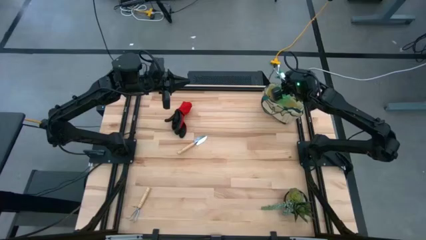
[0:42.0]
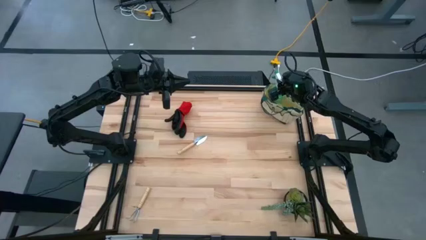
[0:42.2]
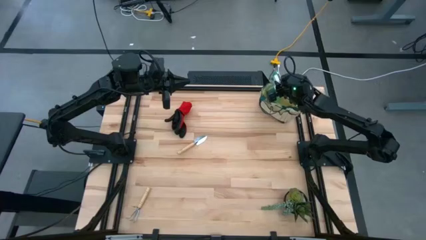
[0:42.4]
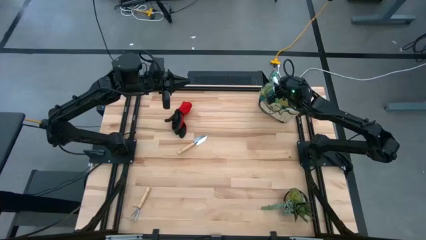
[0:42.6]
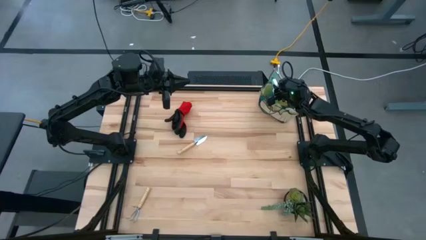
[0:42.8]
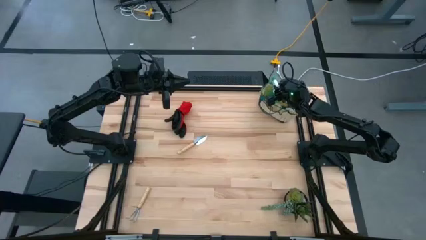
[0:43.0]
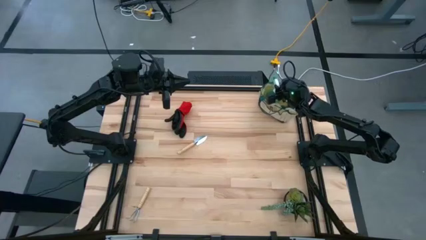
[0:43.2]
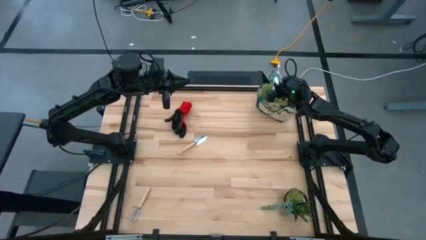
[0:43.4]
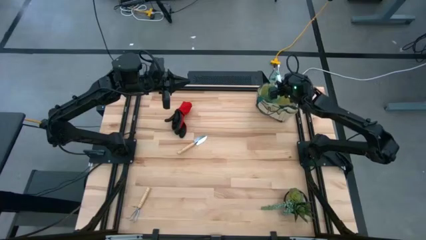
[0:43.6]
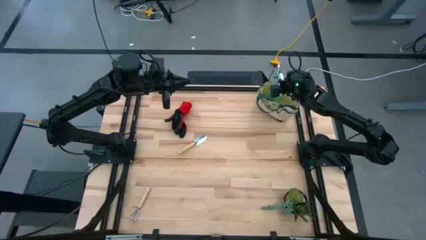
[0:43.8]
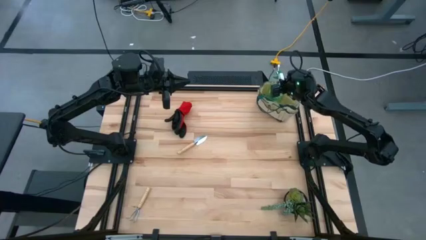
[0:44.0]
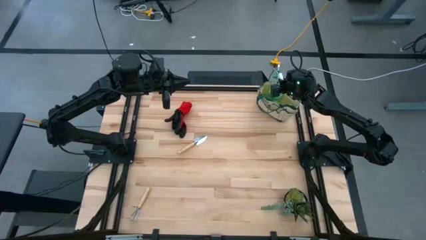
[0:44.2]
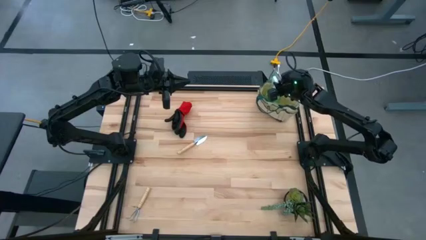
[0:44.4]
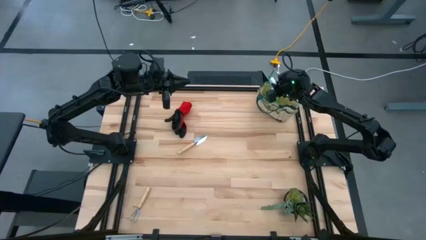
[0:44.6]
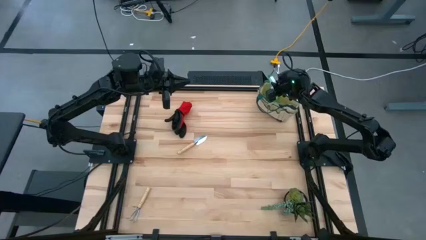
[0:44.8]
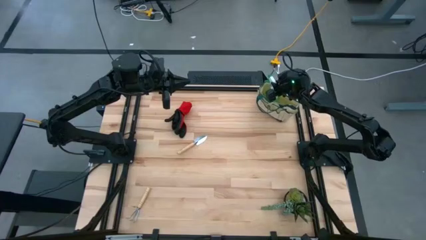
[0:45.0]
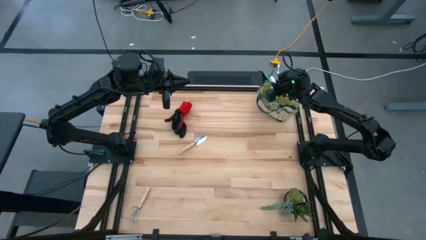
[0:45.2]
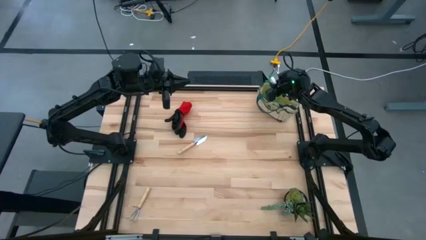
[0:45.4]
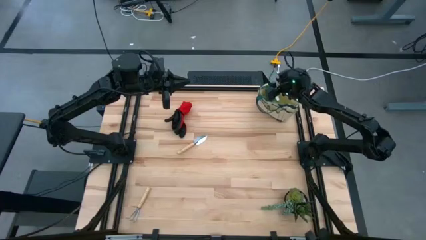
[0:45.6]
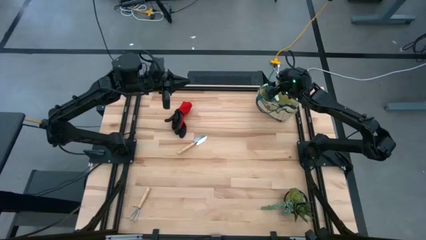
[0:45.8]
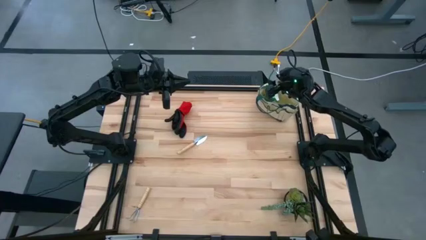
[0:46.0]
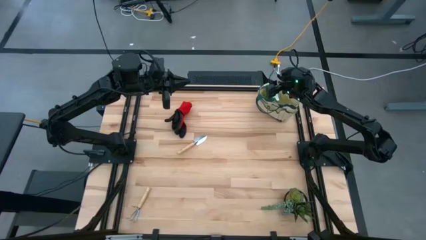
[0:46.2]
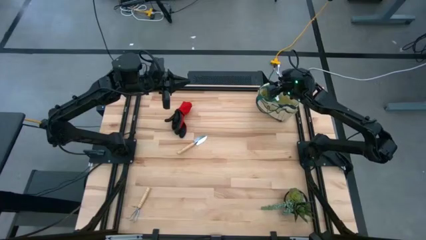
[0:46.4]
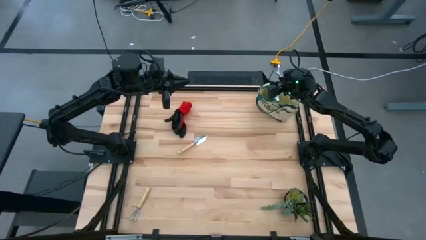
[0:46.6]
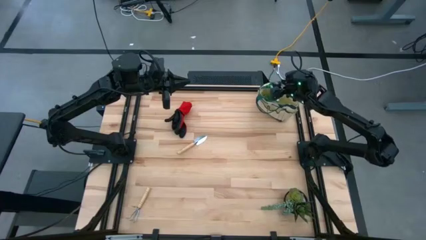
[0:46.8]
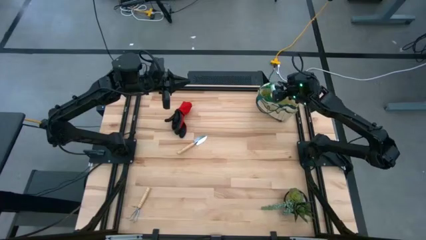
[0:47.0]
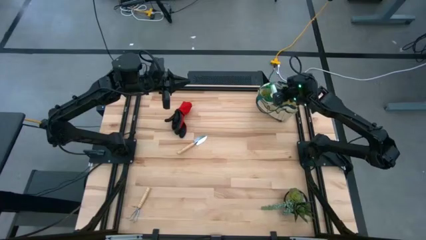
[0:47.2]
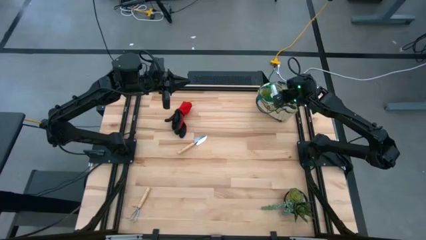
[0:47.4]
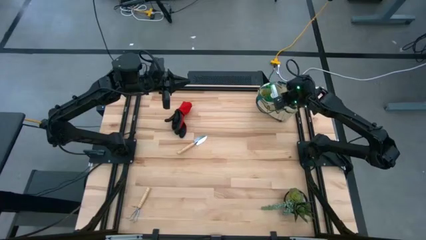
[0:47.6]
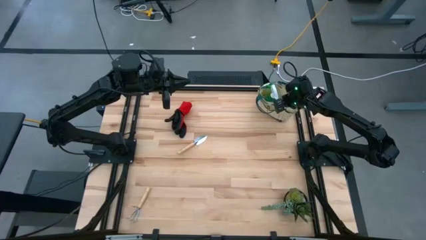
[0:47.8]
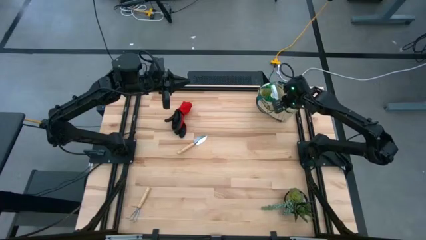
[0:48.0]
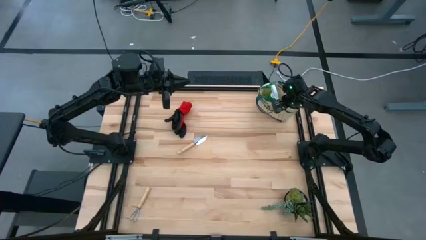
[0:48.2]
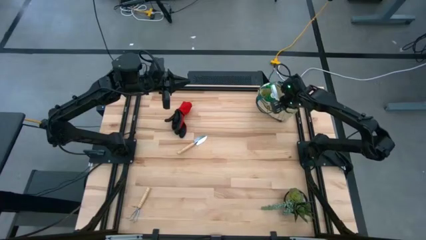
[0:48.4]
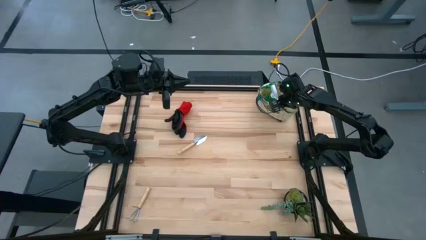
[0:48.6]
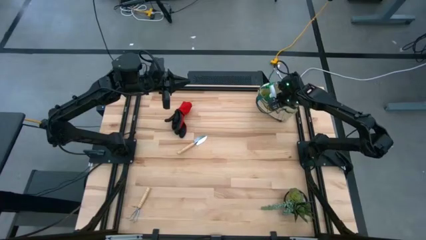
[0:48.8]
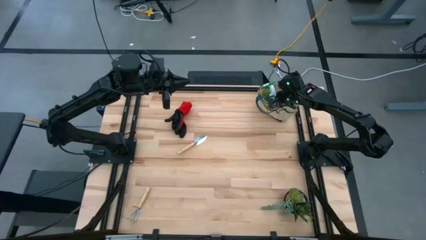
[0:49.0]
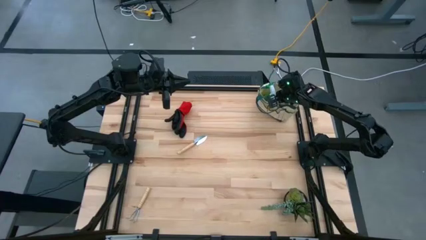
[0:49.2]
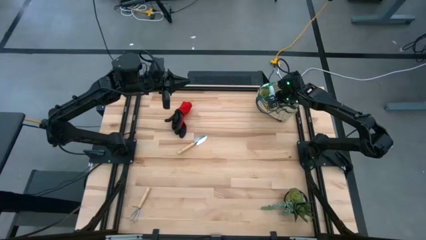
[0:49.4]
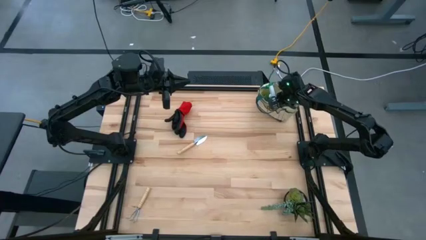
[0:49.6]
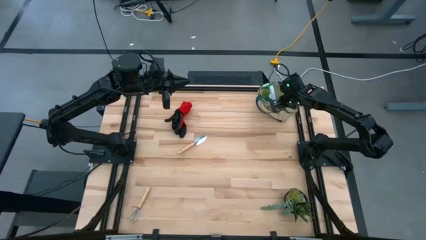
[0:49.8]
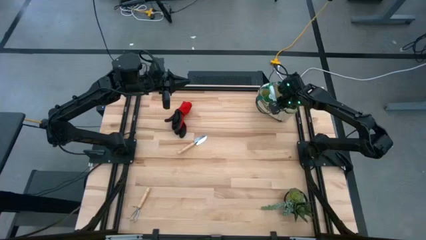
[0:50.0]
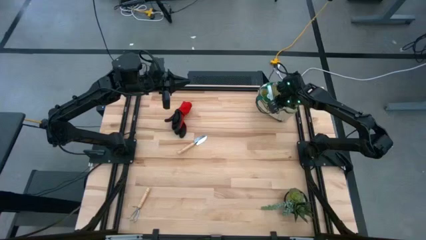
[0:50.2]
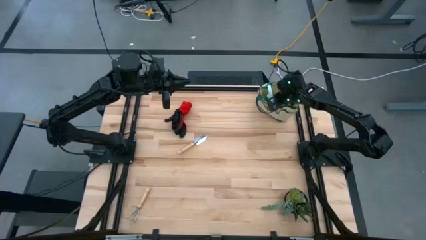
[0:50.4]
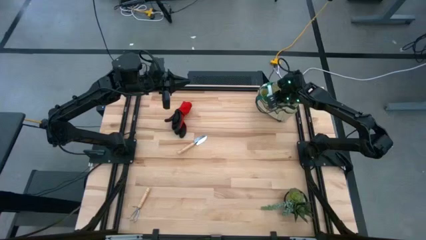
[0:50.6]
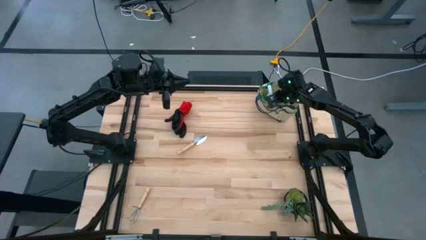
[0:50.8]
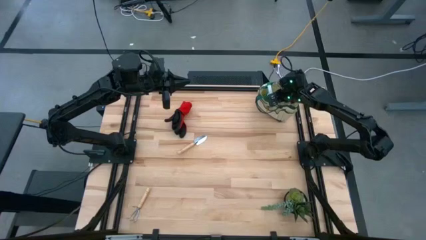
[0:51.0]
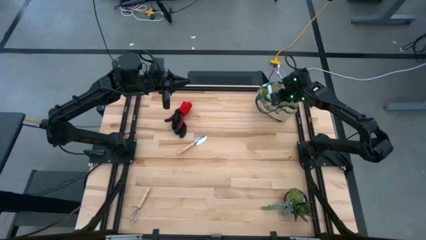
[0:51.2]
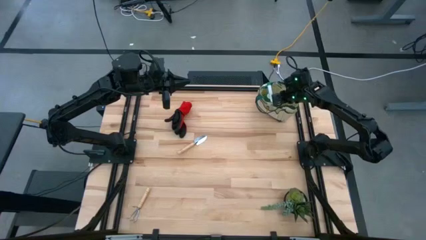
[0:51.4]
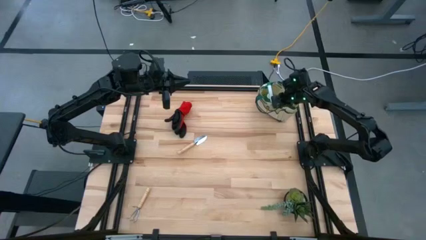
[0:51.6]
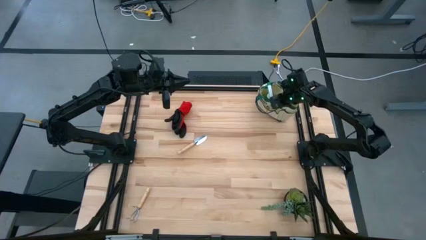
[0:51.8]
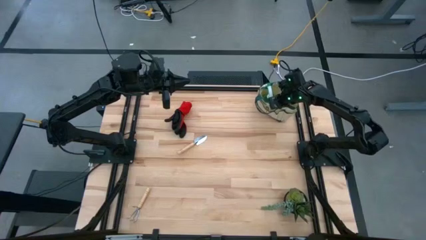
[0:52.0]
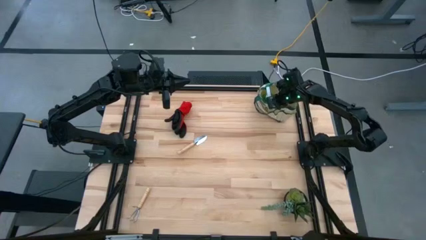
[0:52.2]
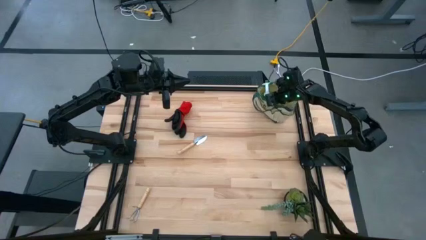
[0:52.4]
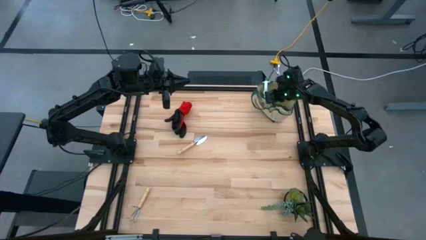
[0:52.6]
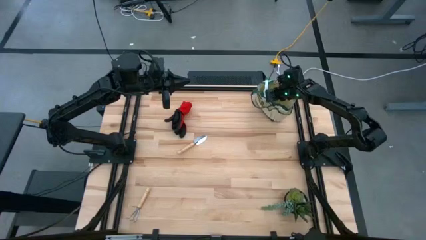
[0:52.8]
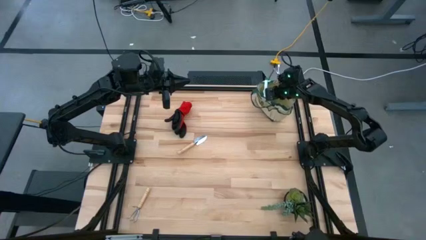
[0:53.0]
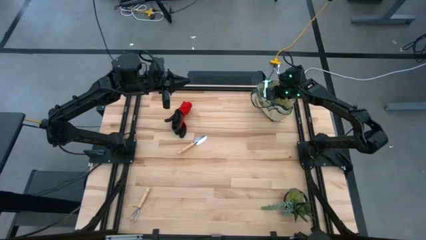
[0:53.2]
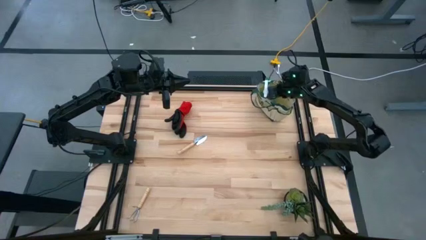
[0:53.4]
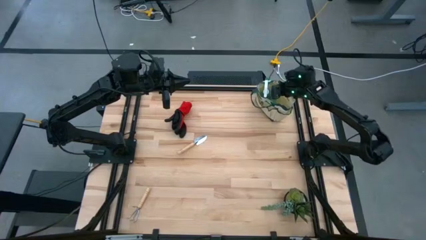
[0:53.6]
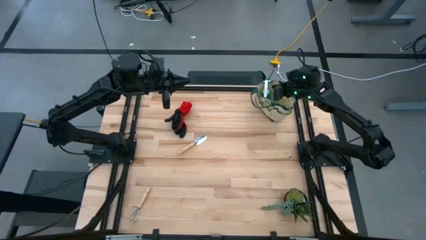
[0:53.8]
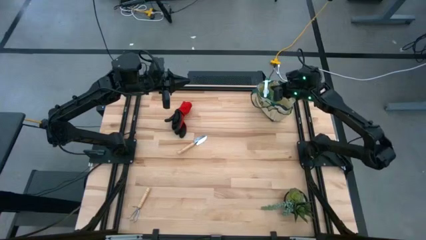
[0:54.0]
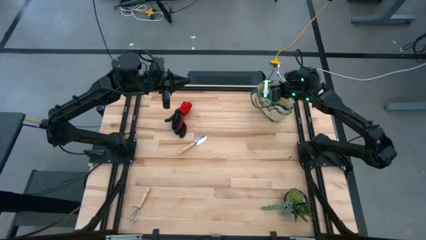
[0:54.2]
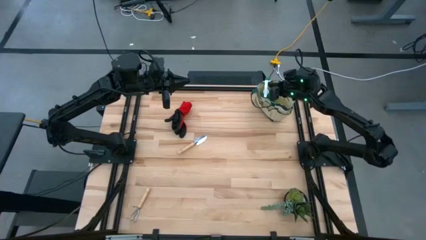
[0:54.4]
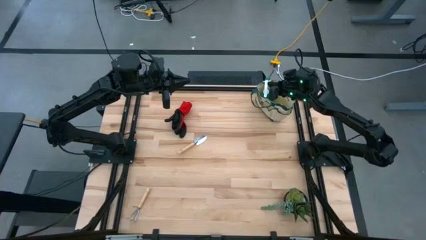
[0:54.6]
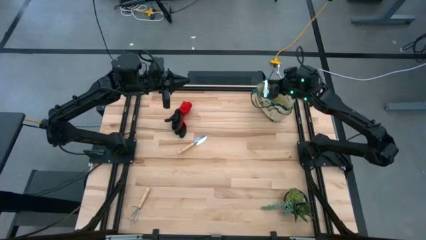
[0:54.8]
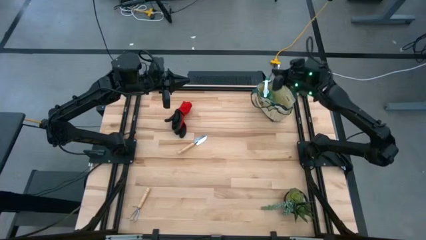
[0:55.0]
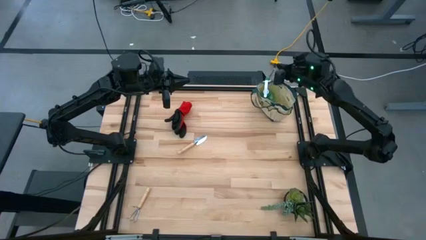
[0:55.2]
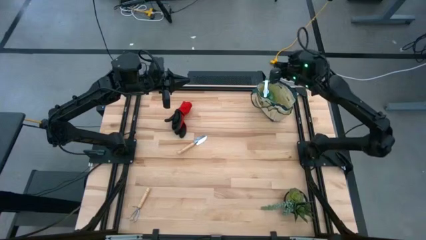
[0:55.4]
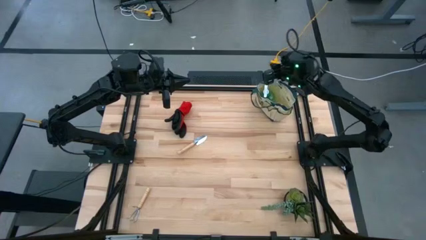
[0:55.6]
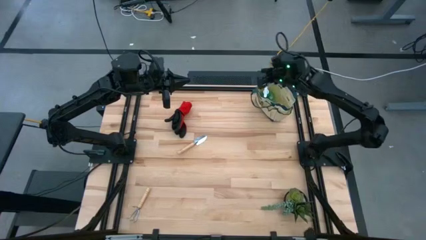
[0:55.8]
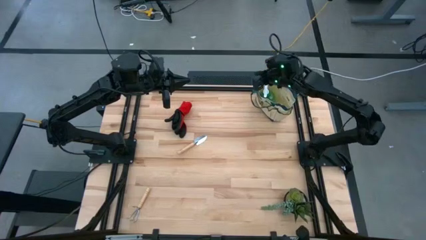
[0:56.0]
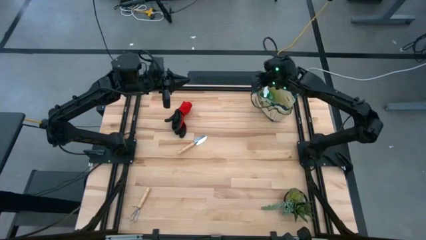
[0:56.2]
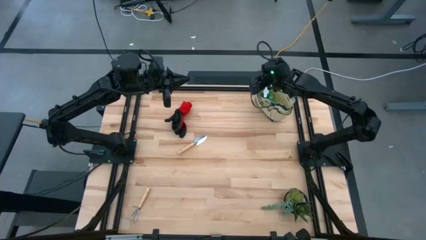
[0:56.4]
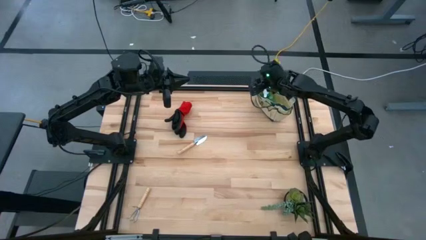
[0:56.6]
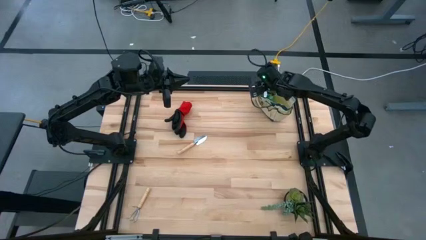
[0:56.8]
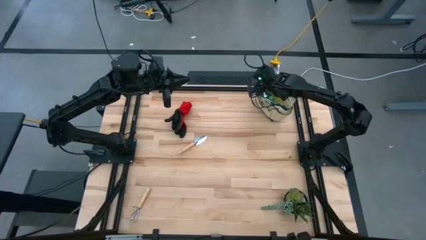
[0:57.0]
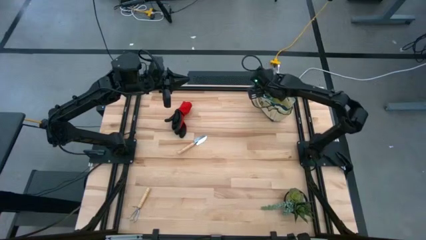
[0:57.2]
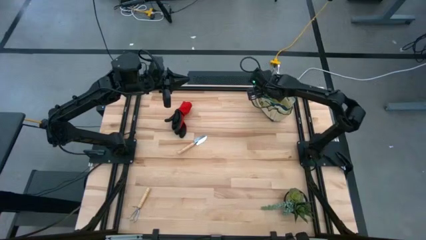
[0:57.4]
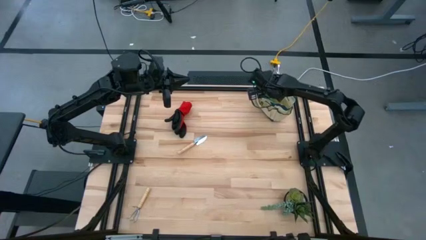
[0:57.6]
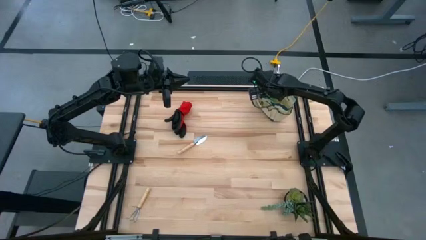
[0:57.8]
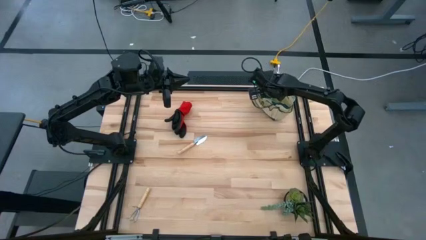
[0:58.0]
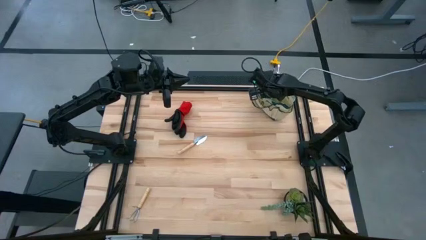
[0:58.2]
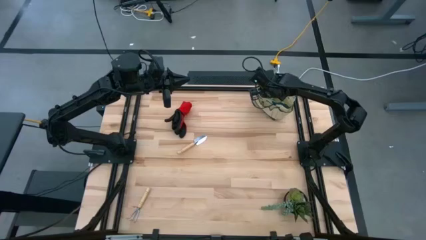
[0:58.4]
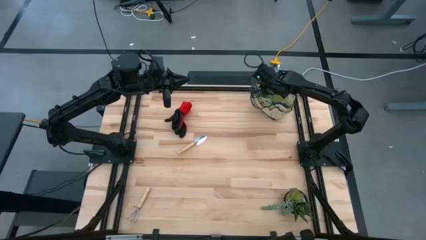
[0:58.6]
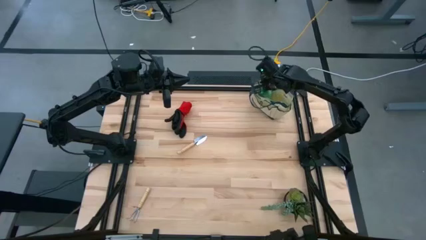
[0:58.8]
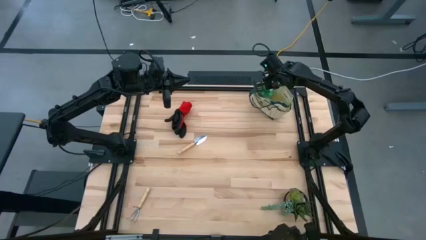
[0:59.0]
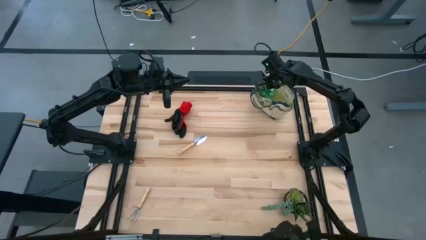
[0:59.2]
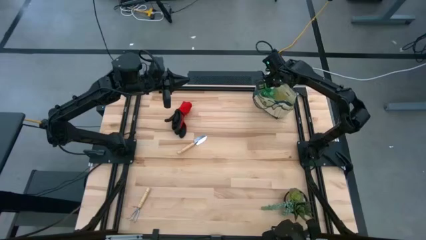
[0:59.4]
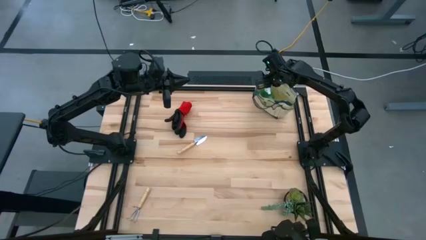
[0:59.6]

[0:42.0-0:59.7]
Task: Pick & Place Garden tools in Gardening bag
Put the green spray bottle into the gardening bag
